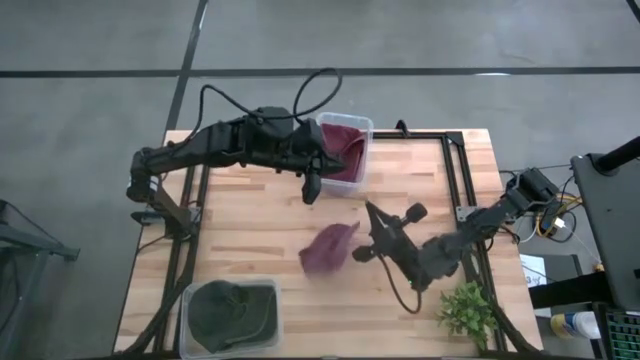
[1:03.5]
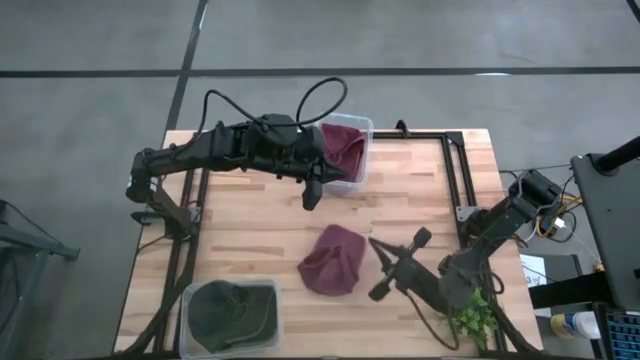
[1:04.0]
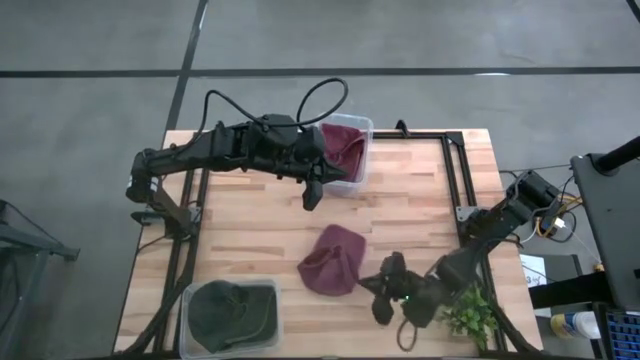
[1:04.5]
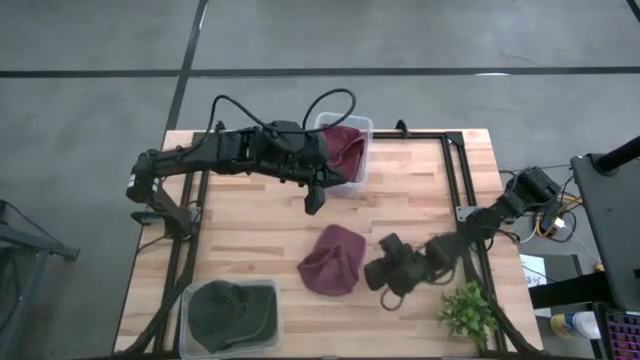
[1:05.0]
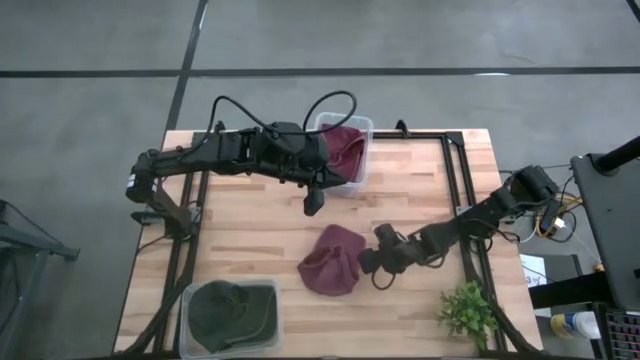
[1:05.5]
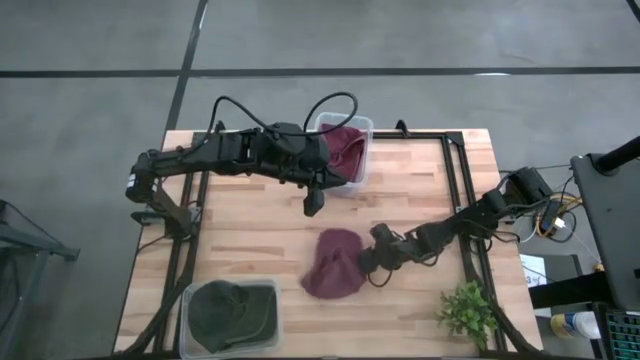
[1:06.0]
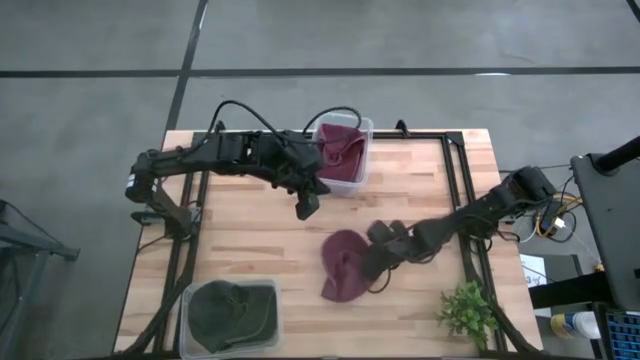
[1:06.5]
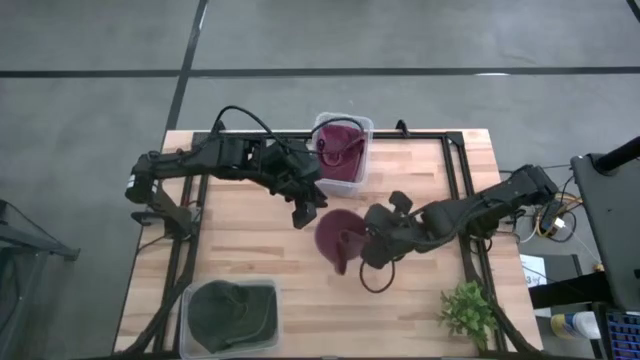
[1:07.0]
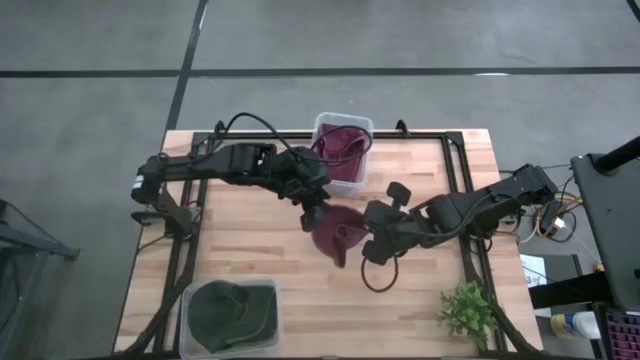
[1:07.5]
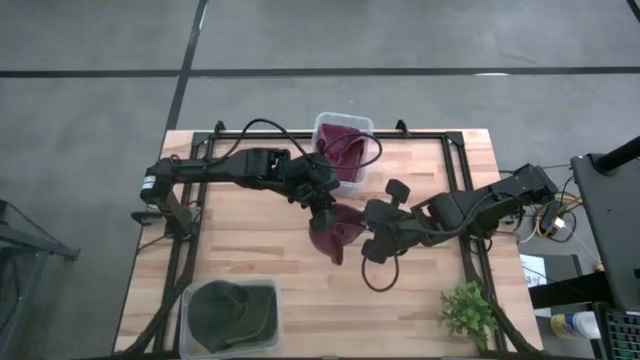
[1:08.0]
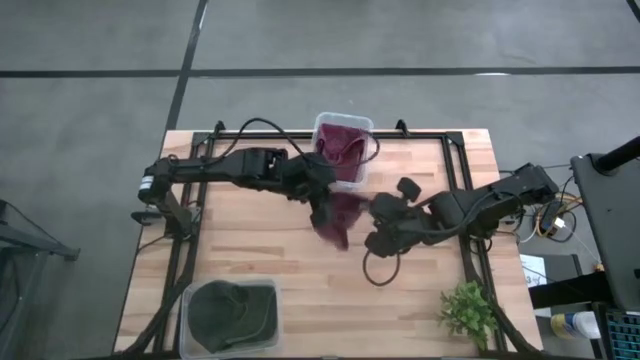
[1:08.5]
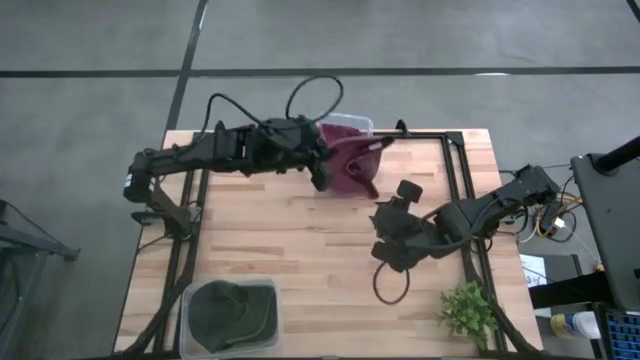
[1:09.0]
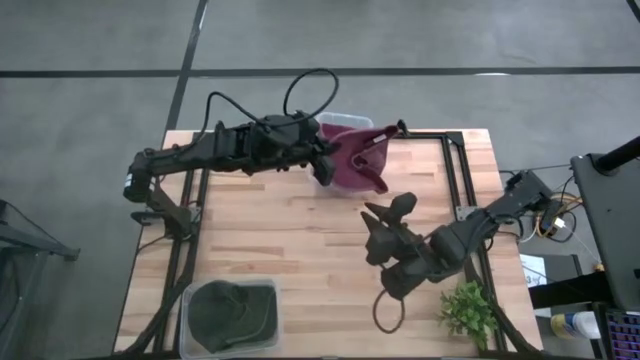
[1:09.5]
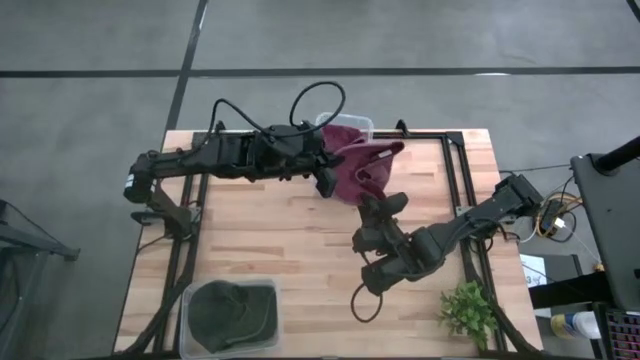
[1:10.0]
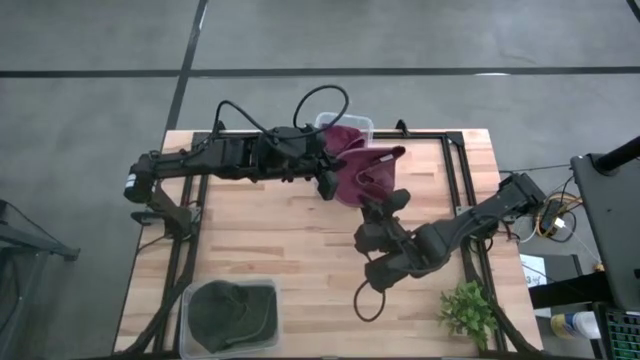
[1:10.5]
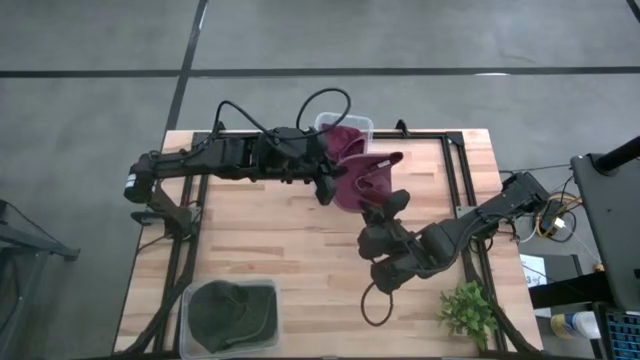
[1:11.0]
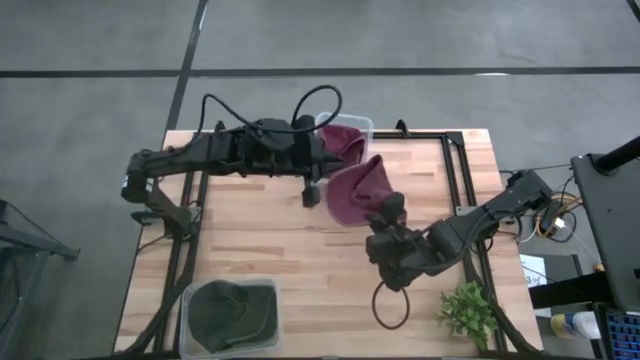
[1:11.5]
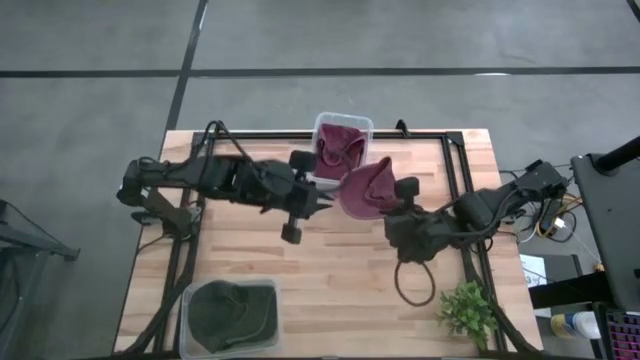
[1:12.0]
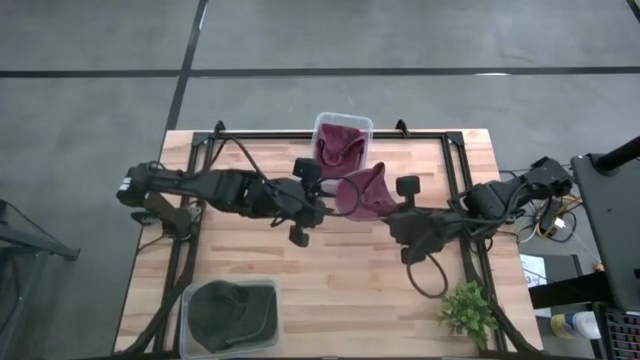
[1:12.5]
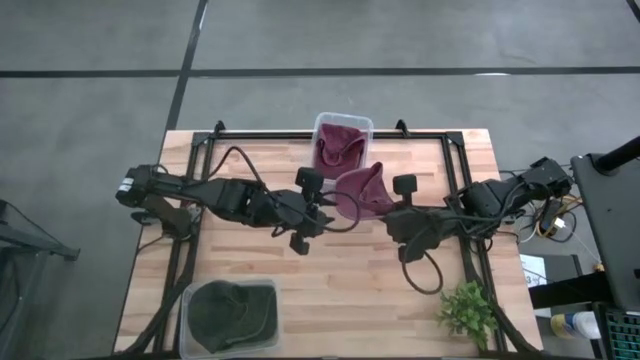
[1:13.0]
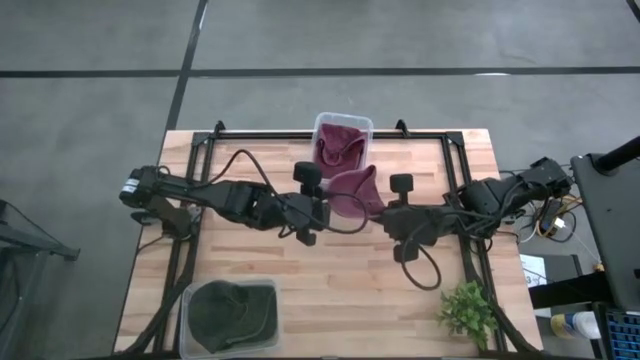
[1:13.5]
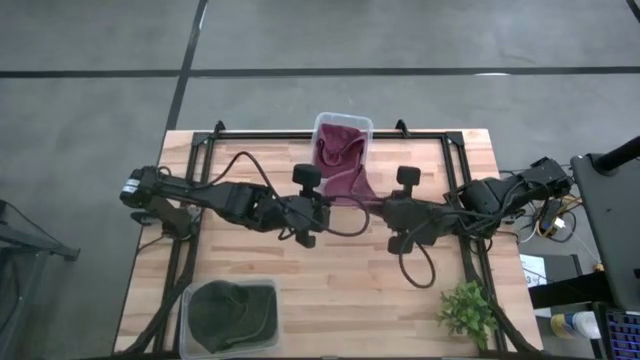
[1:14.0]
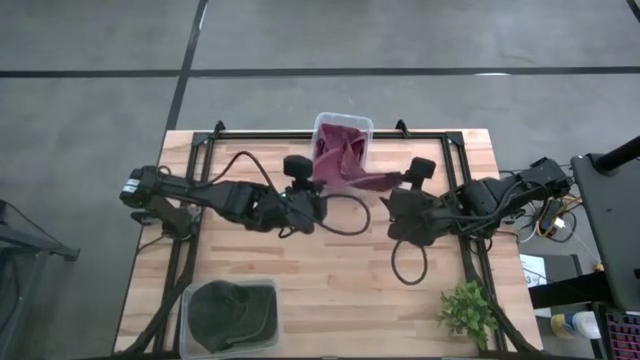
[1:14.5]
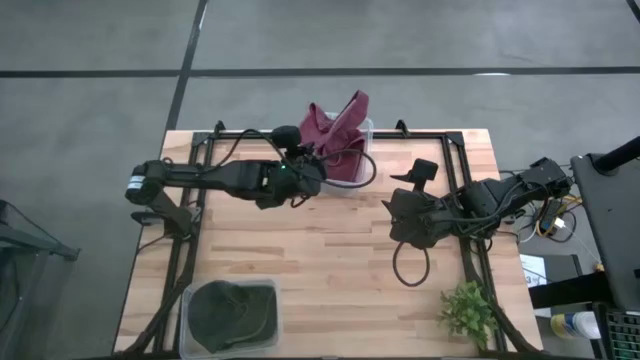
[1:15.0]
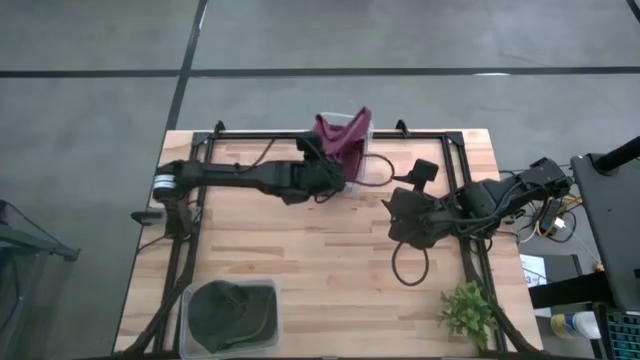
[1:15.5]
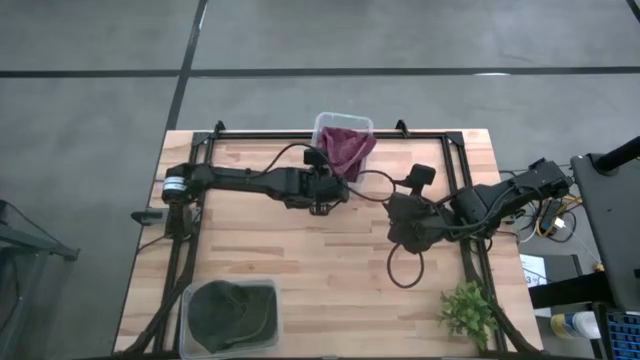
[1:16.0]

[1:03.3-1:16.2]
Task: Pick & Place hat
Put the red cap into the top transparent bin

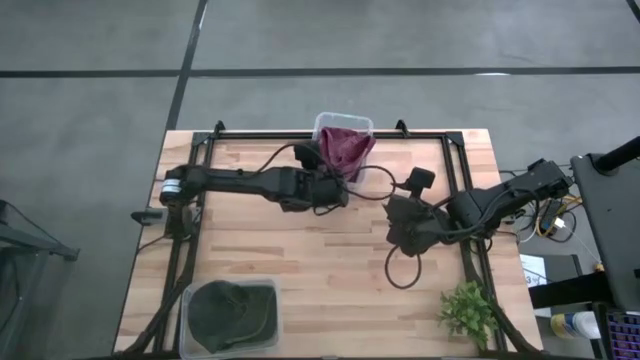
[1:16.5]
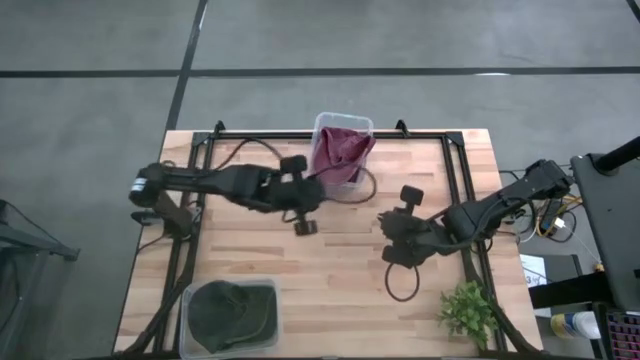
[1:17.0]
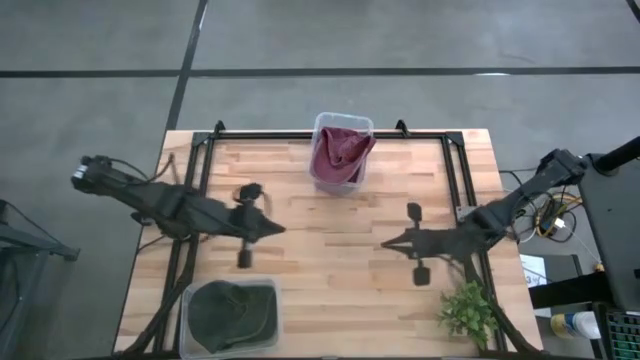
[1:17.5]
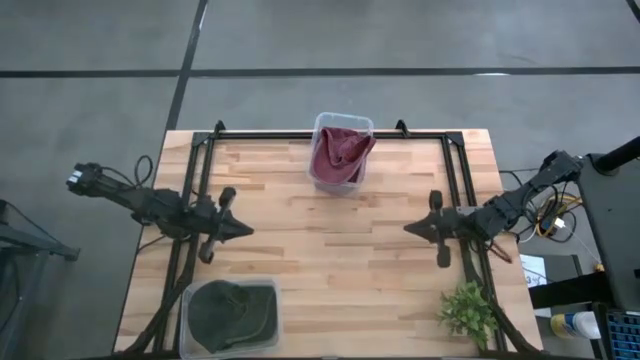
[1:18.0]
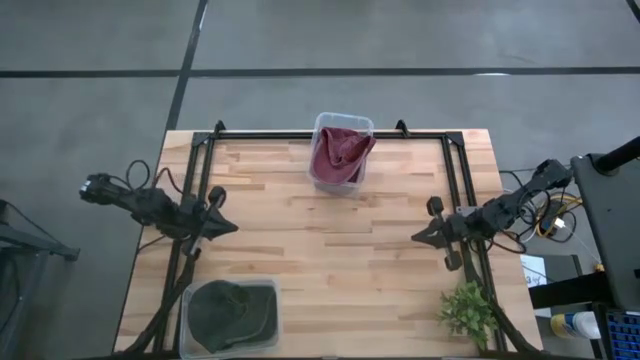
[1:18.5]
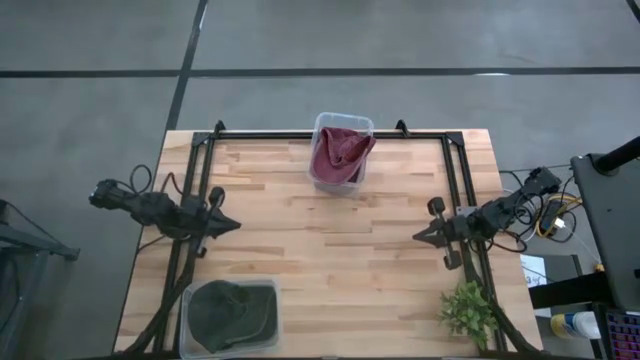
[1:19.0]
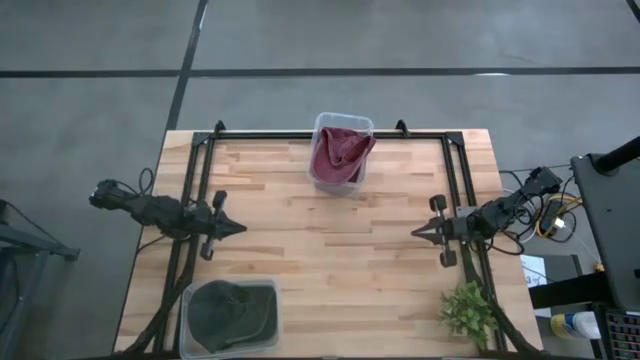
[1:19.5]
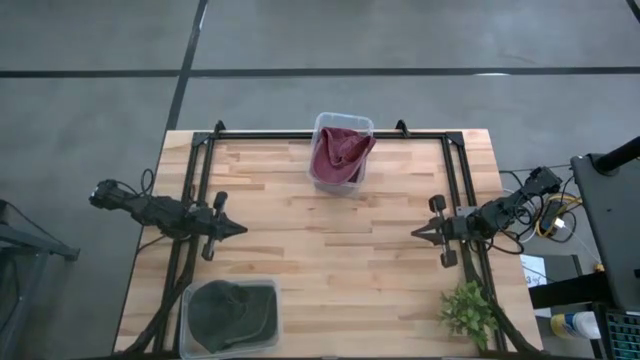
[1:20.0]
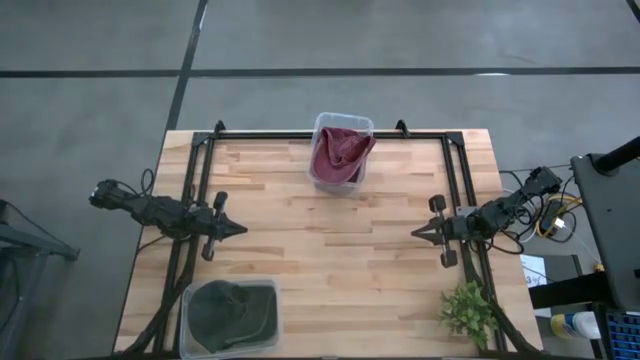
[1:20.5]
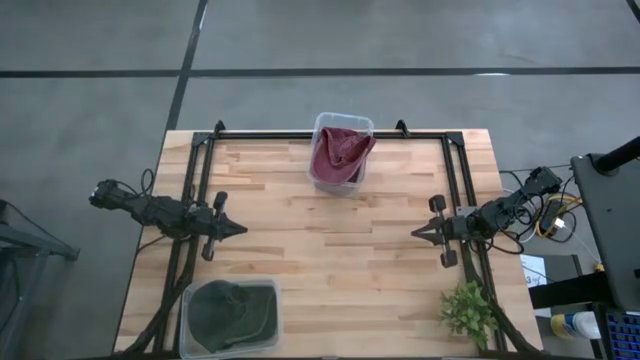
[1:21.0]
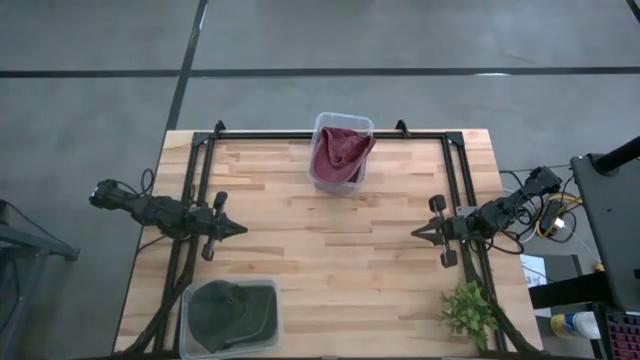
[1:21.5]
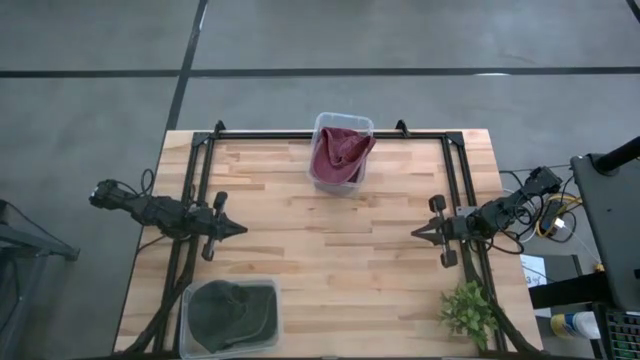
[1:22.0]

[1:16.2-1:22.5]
Return to Home Position

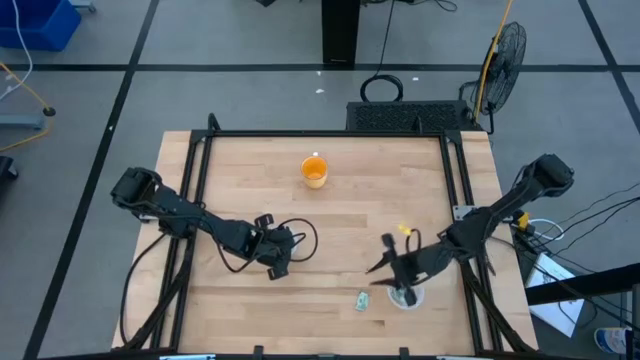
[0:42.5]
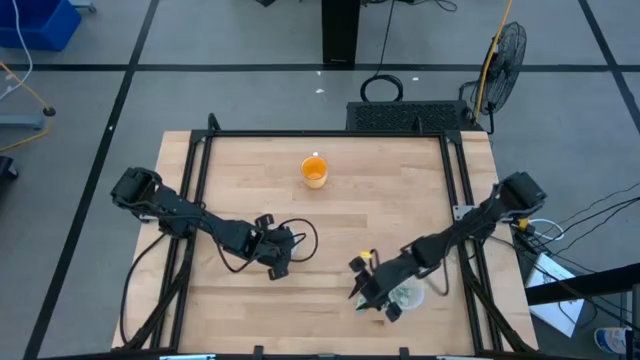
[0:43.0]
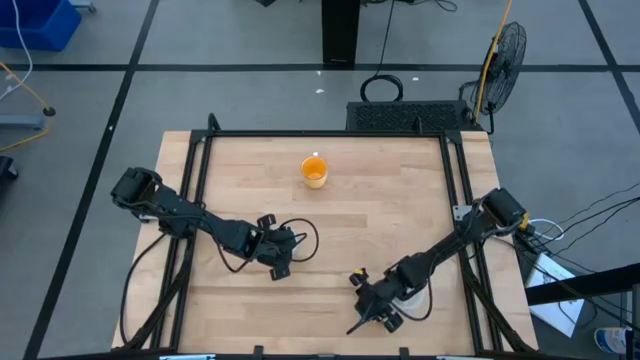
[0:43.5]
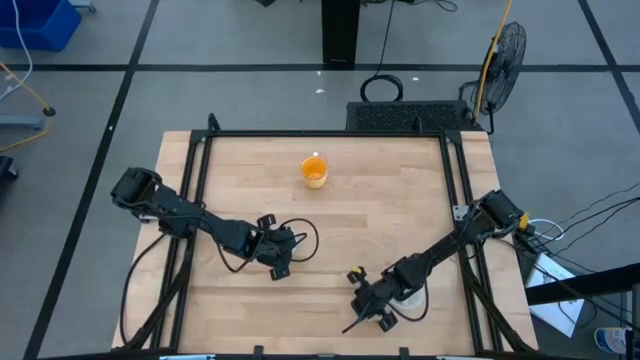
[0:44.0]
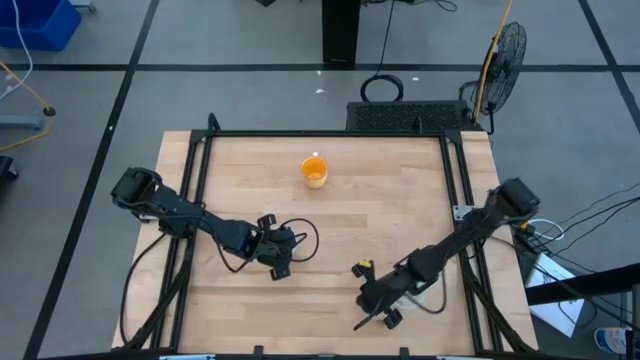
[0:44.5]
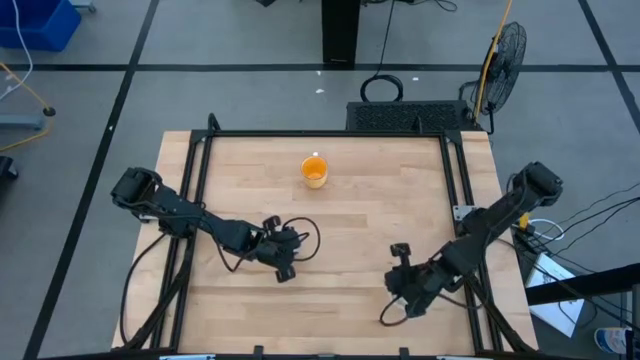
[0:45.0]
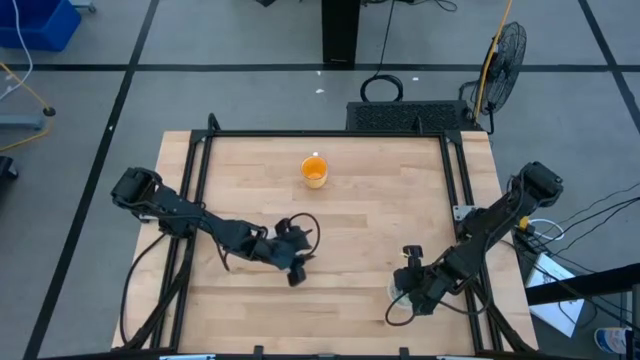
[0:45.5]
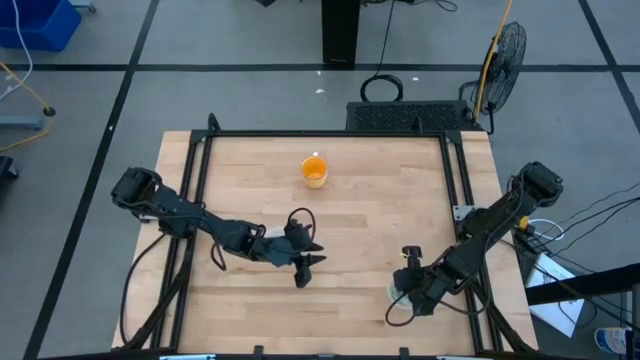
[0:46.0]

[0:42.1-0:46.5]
Task: Pick and place Stevia / Truvia into bins
Put the white stevia packet into the bottom transparent container
